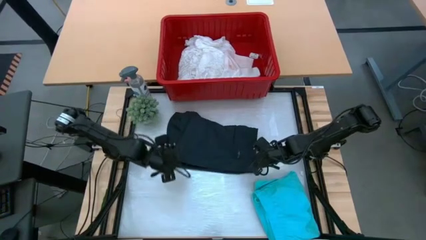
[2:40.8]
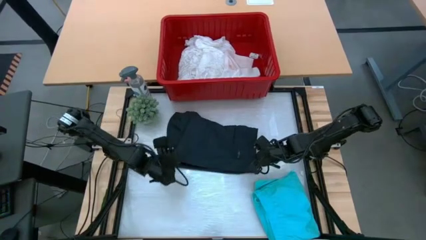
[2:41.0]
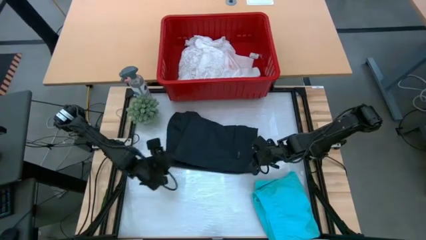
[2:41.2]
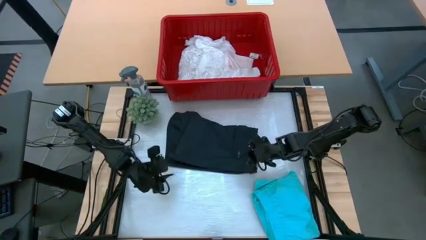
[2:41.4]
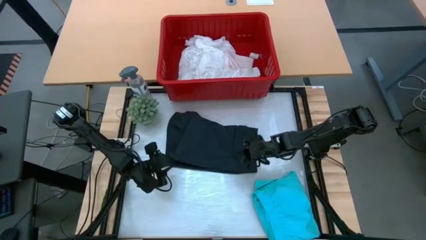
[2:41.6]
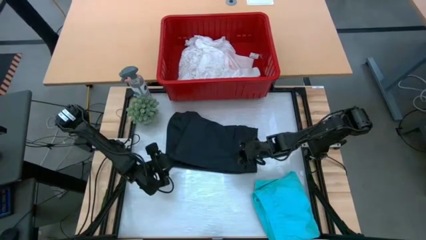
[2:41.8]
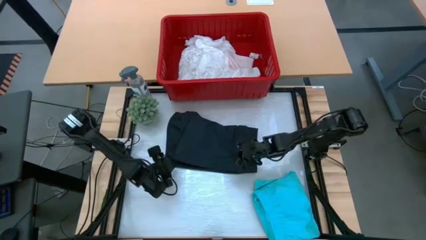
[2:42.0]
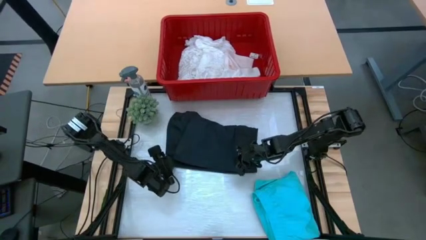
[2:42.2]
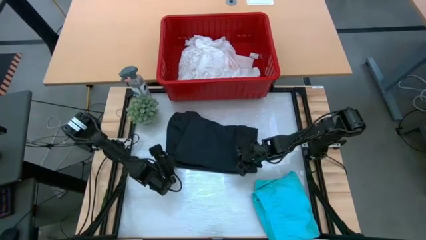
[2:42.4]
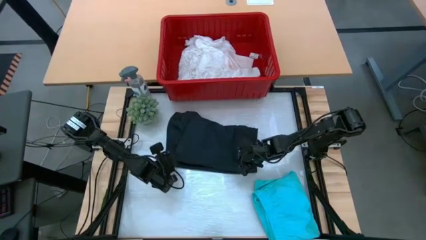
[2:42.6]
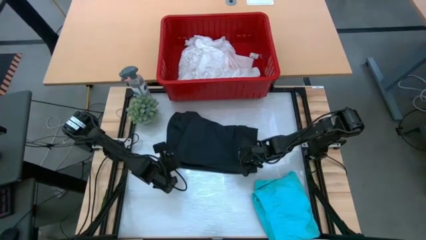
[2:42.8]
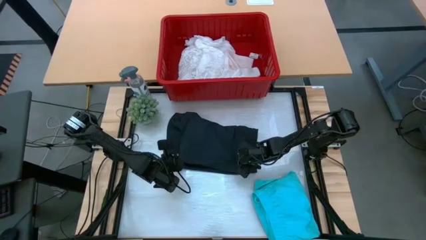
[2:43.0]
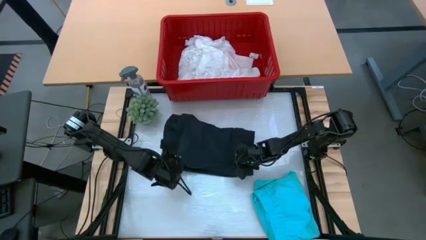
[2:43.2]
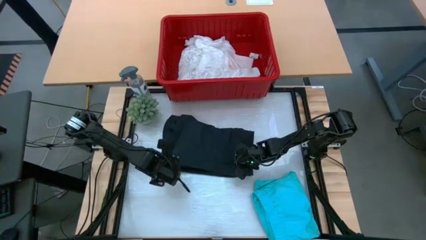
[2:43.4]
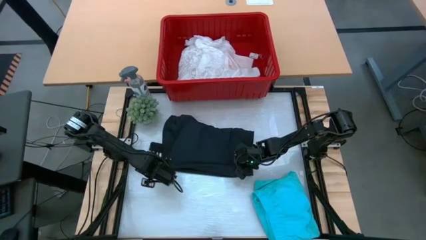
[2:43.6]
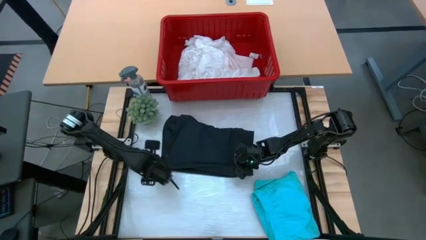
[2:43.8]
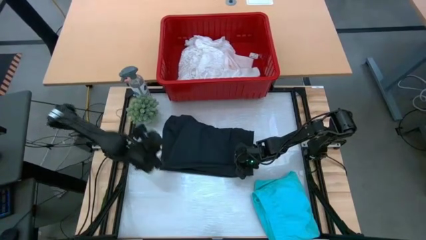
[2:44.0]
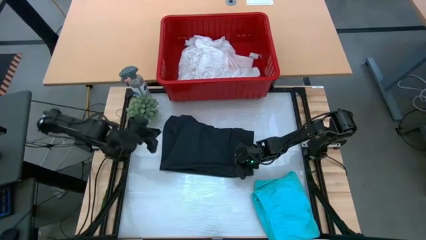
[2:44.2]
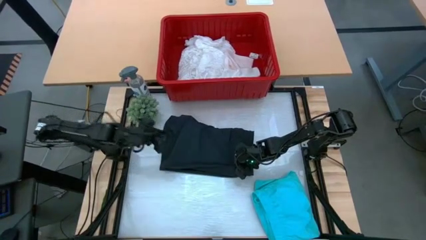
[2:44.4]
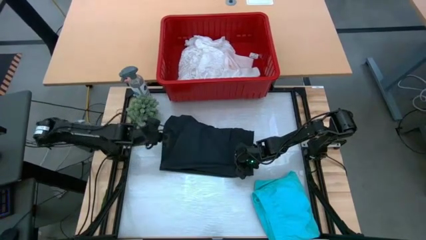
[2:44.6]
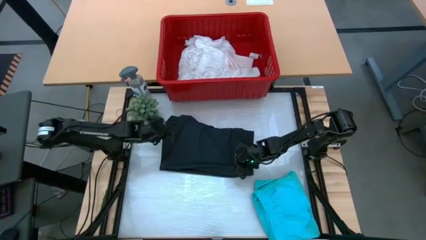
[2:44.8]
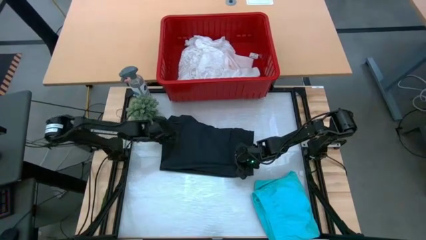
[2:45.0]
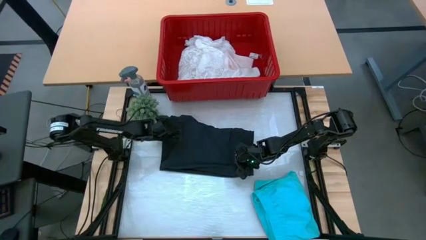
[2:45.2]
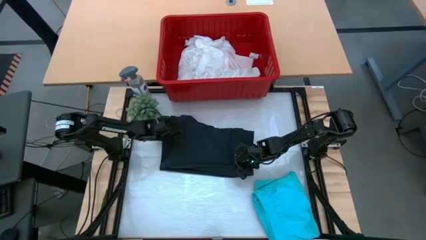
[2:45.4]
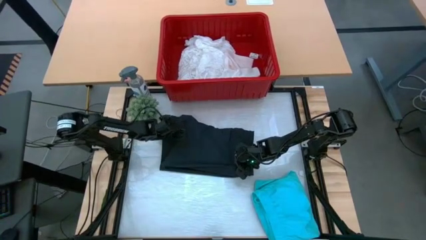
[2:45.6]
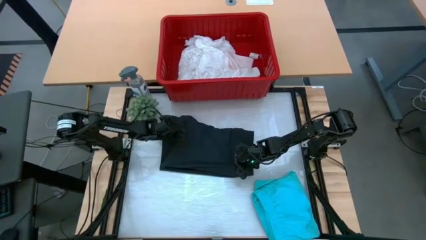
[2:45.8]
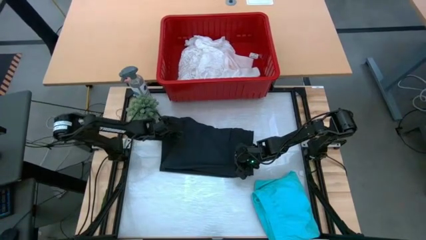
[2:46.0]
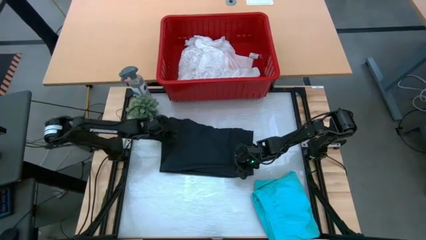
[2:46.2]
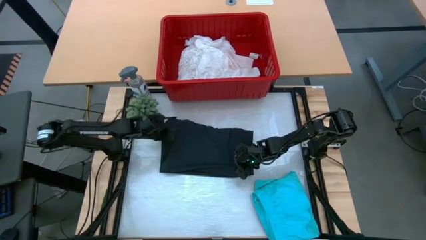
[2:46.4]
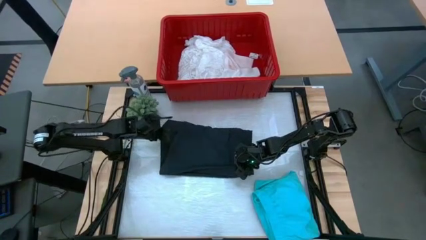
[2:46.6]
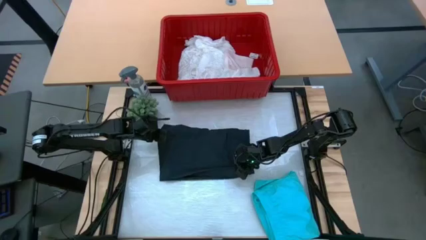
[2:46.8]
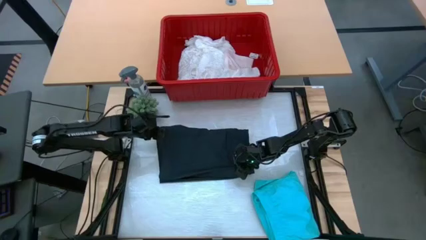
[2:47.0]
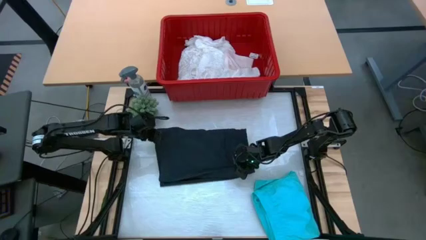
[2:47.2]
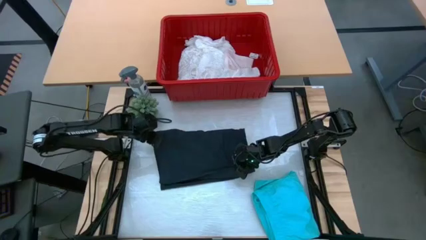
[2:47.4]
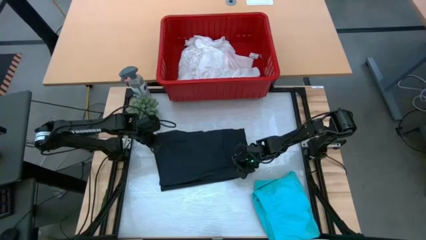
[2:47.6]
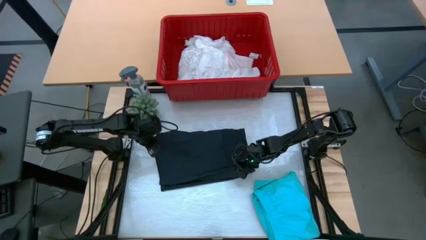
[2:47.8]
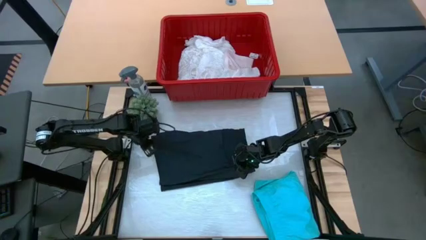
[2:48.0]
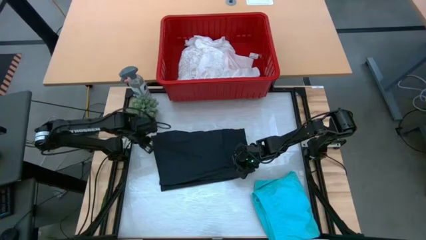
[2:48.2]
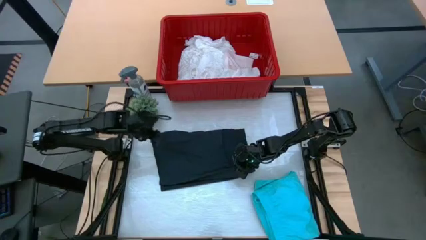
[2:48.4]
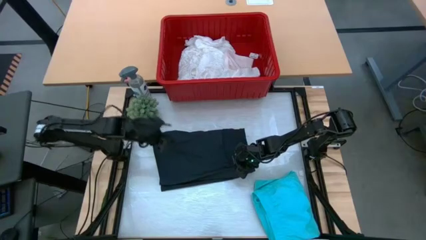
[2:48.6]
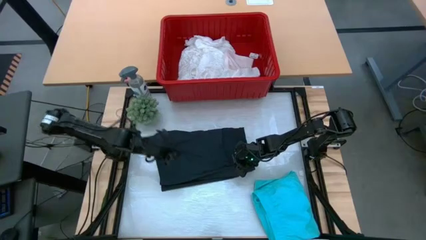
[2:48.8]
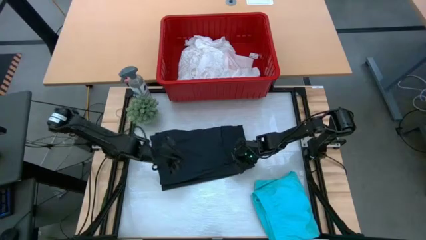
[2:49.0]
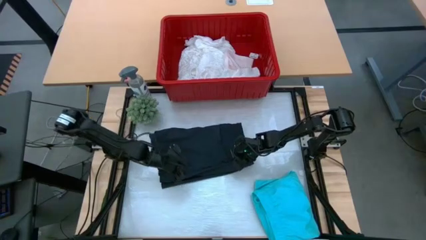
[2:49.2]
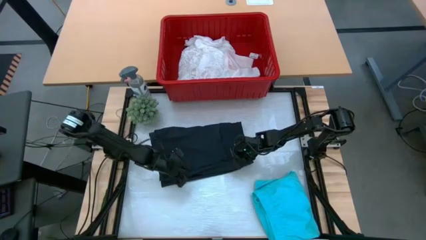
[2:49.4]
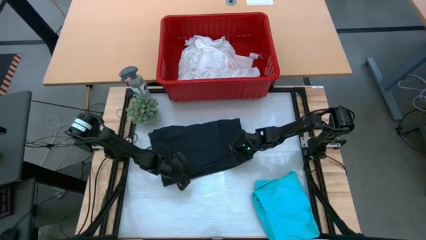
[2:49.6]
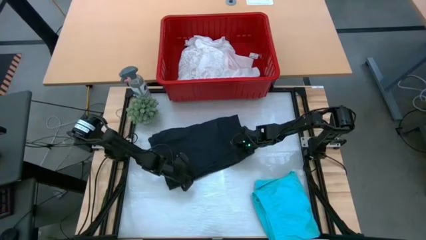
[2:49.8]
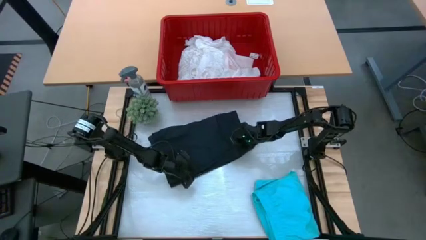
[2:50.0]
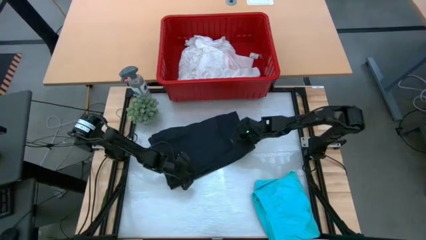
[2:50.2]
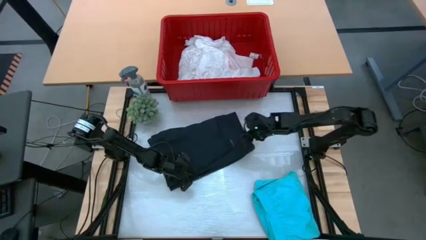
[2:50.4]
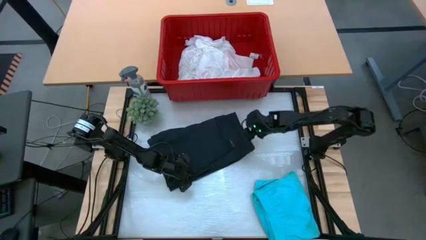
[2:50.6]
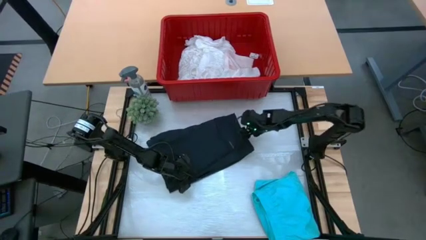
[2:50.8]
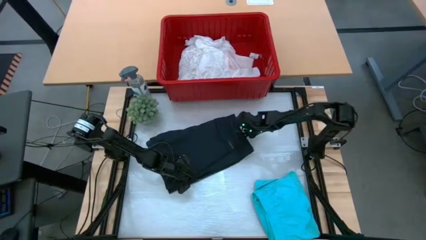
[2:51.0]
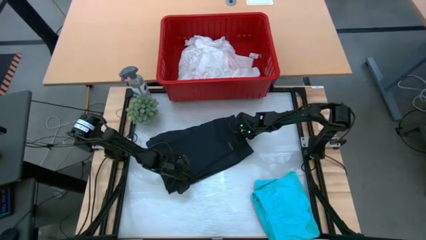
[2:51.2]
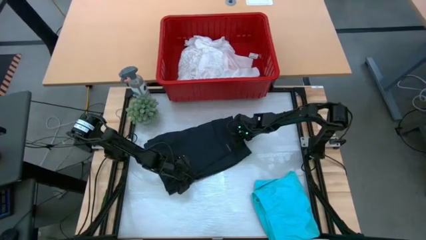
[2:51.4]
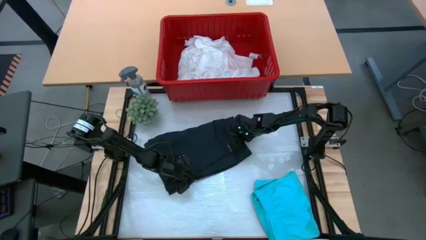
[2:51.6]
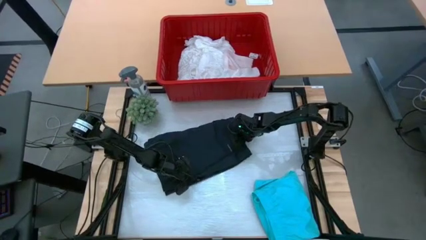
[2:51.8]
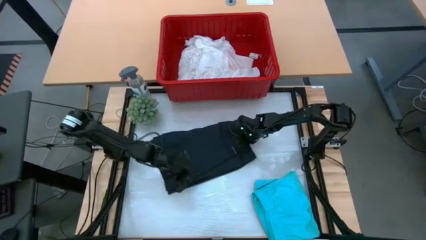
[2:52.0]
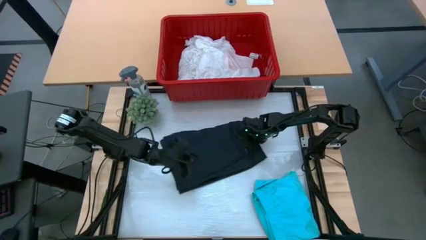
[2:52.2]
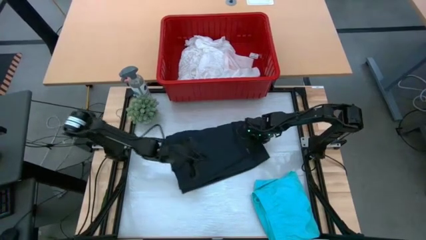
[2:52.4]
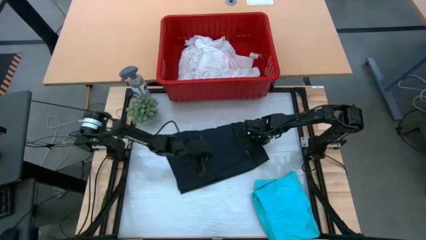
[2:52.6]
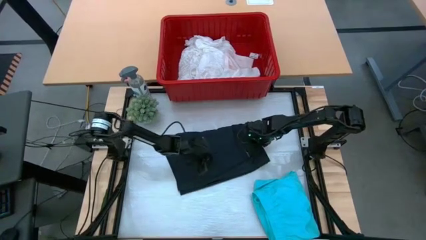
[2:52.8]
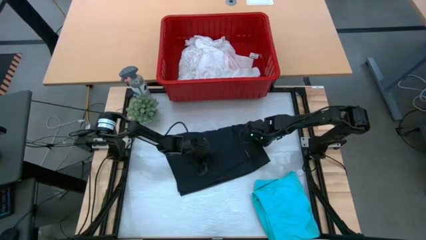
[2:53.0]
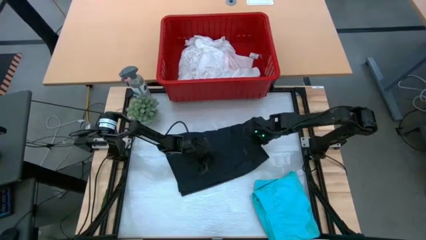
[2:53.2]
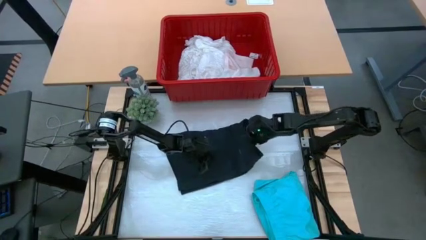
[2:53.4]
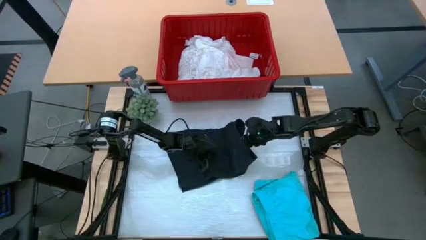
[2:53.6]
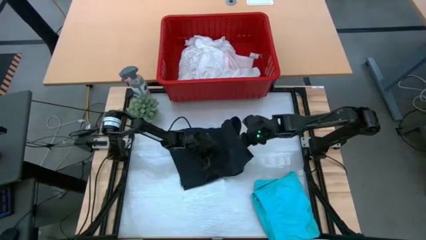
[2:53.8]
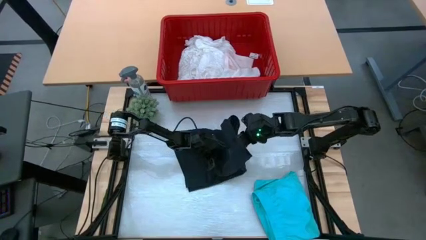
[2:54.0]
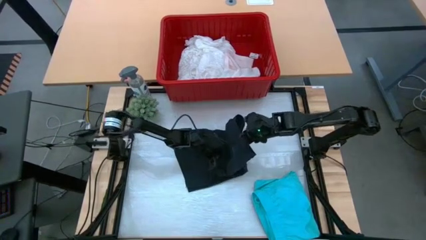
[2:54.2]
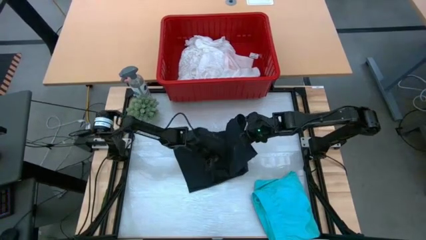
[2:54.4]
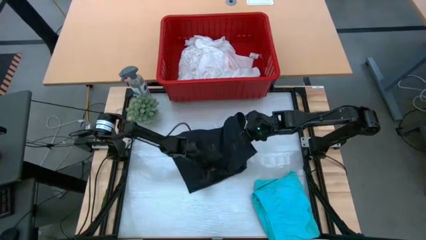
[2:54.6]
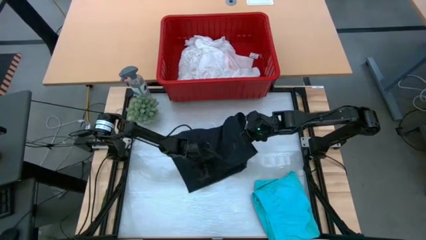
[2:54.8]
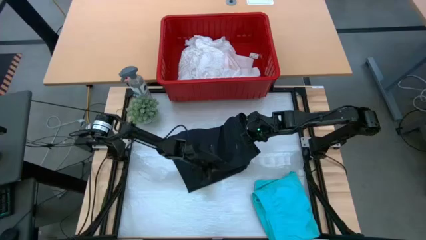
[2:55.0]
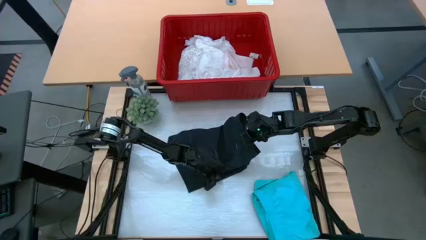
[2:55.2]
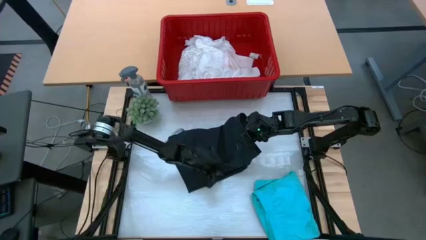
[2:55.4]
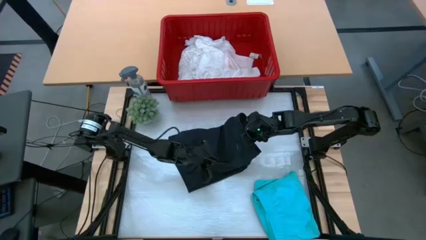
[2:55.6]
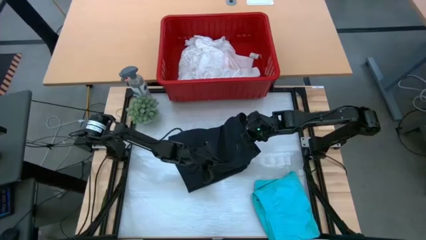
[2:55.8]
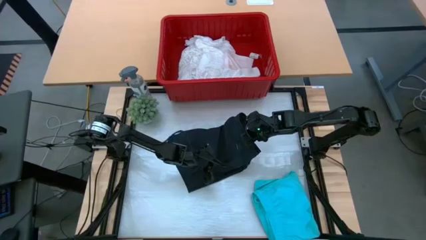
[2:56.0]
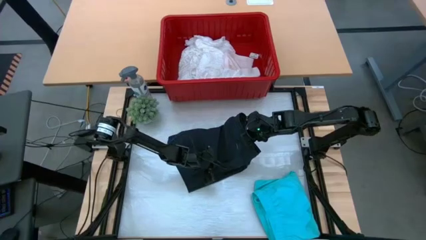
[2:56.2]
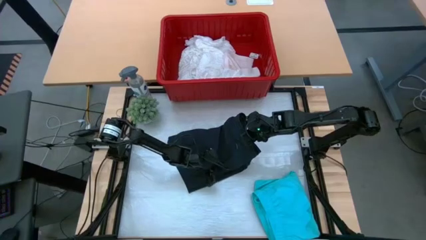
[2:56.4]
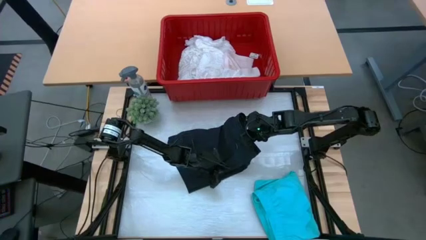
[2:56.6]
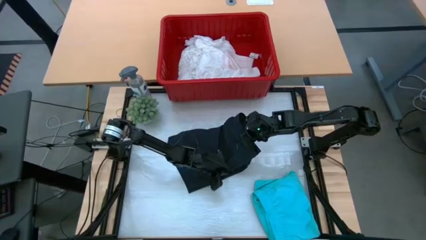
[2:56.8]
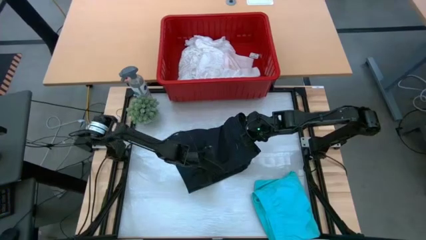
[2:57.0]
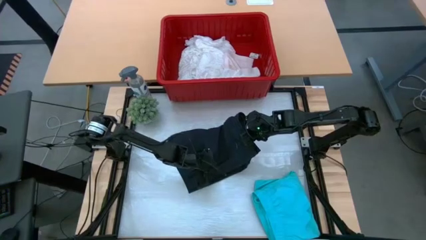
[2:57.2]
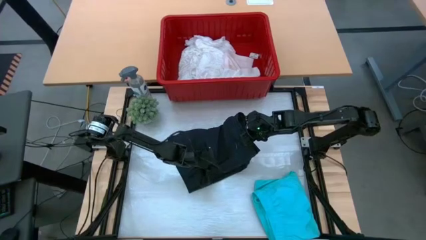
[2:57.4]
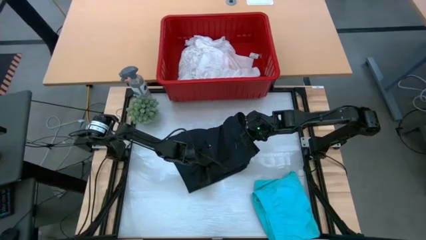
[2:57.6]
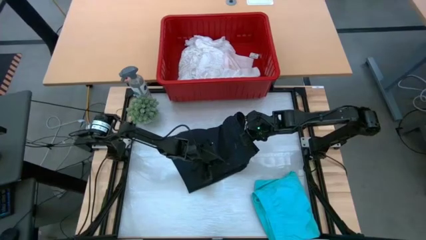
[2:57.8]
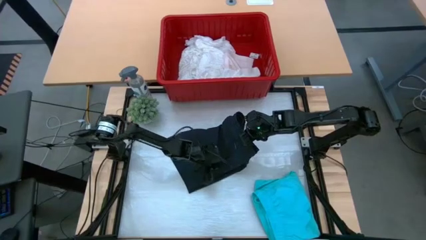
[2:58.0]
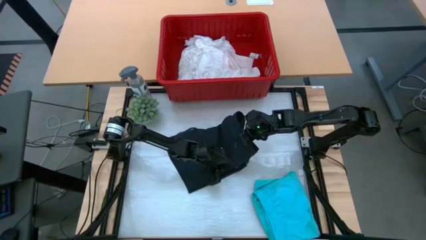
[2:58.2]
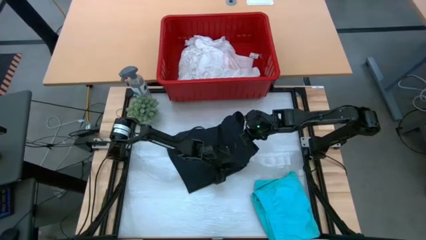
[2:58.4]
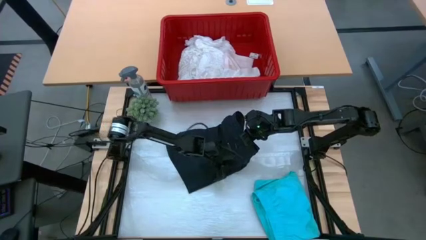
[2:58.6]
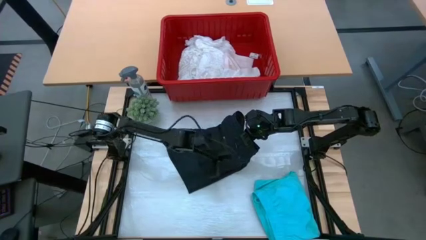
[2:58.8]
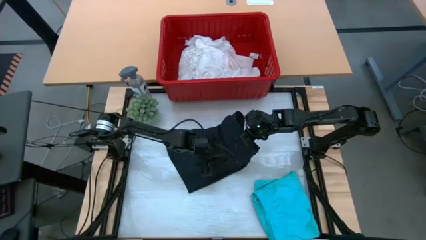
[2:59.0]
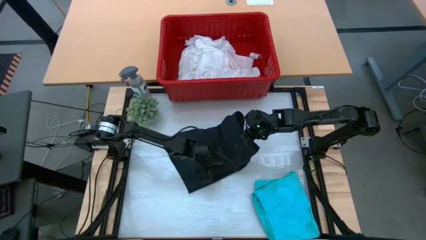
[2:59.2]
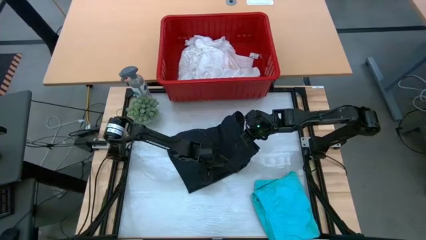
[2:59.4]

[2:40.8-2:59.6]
Task: Fold Laundry from Bin
Fold the black shorts
